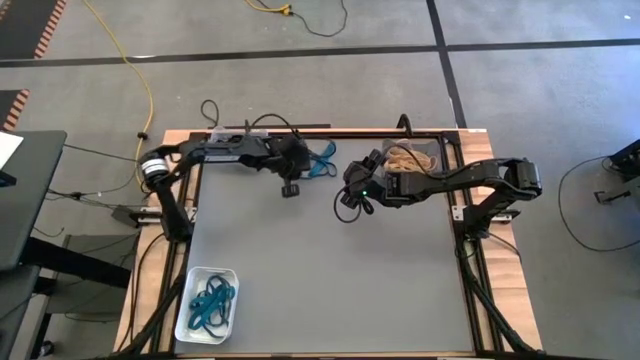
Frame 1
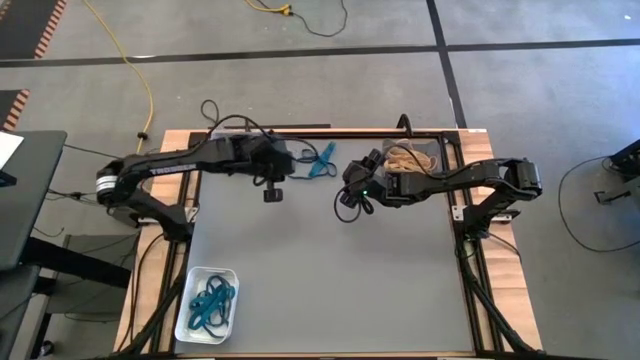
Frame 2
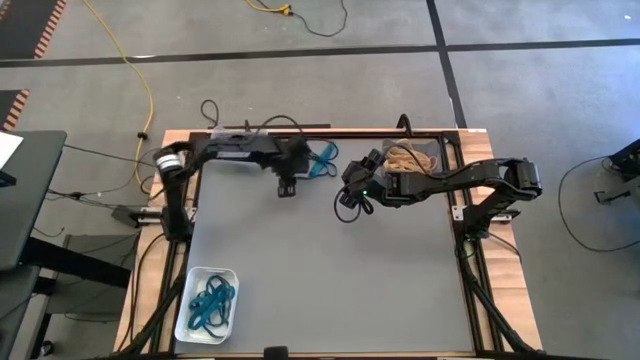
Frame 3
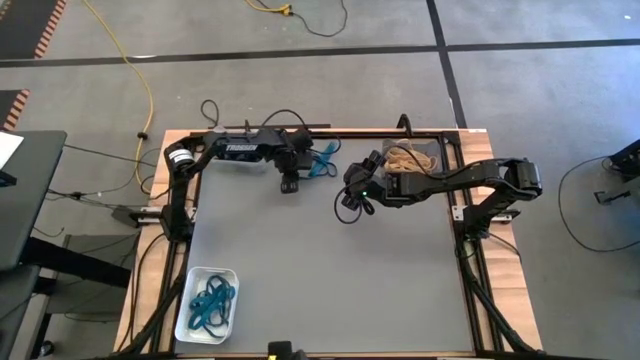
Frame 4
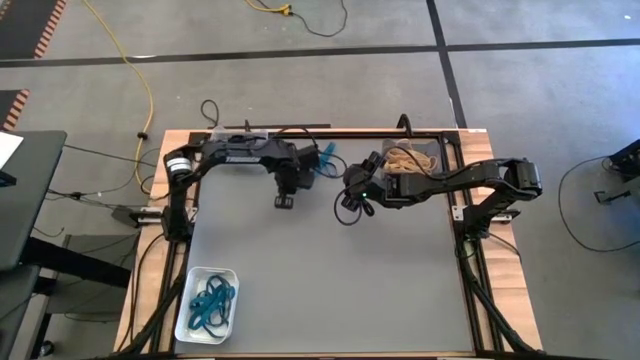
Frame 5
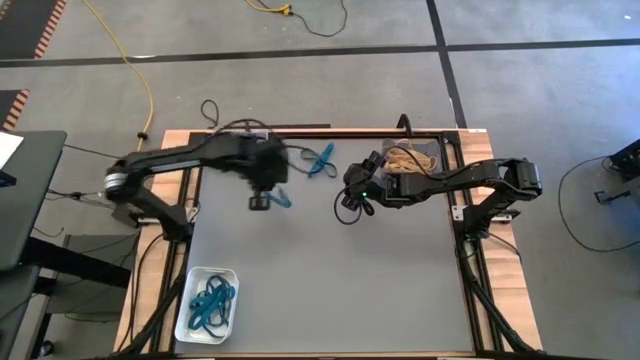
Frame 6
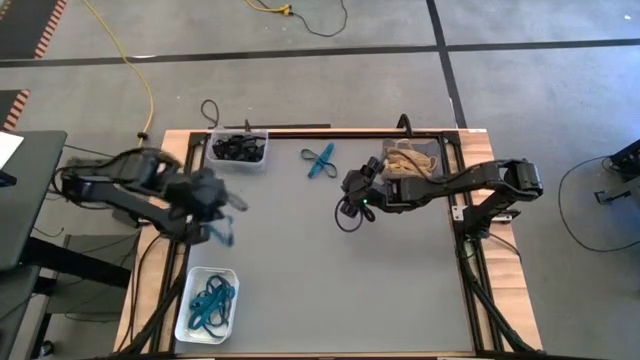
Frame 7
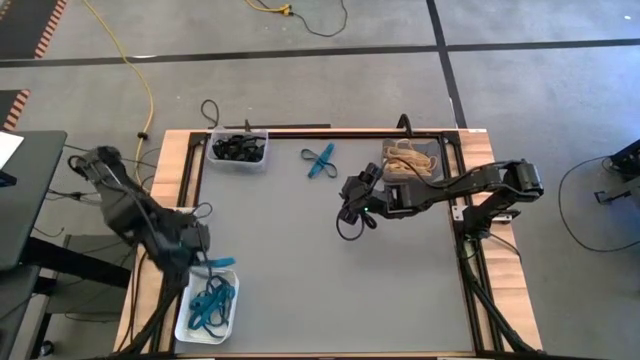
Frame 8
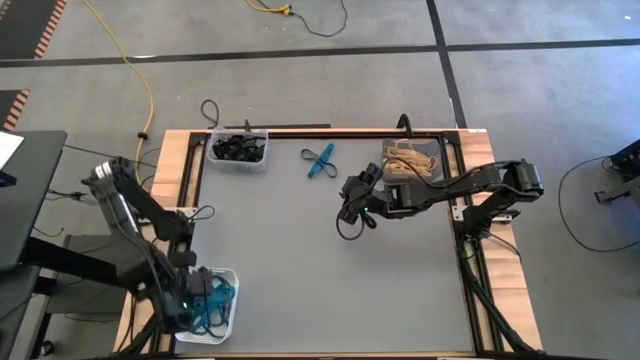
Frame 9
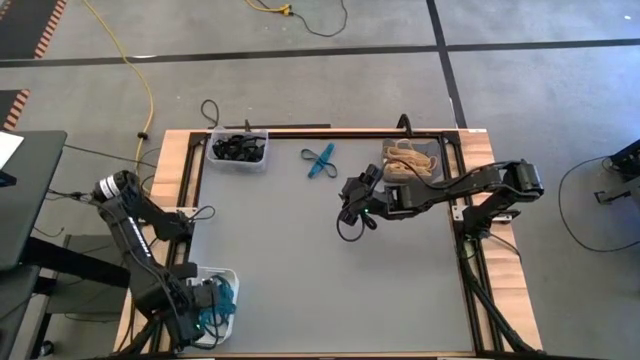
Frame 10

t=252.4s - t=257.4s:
Task: Sort rubber bands into baskets
Put the blue rubber band into the white bin

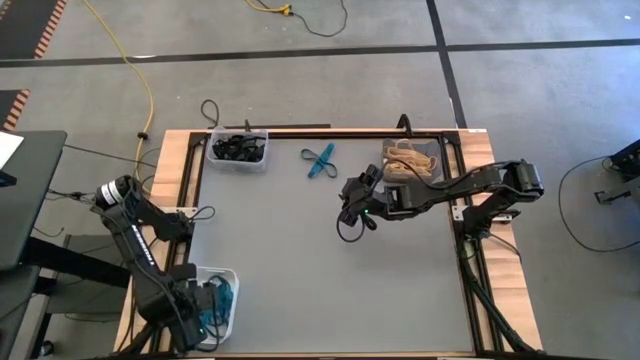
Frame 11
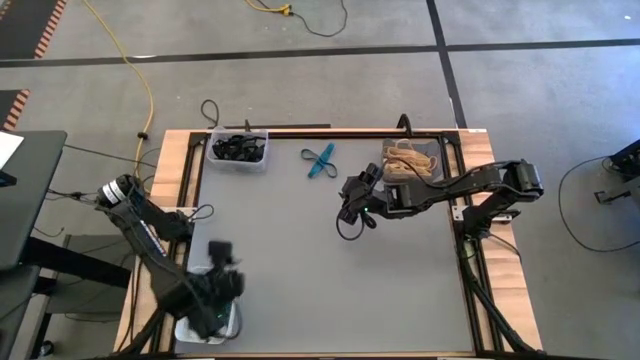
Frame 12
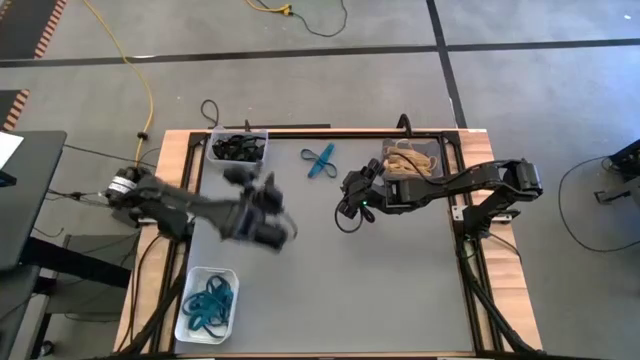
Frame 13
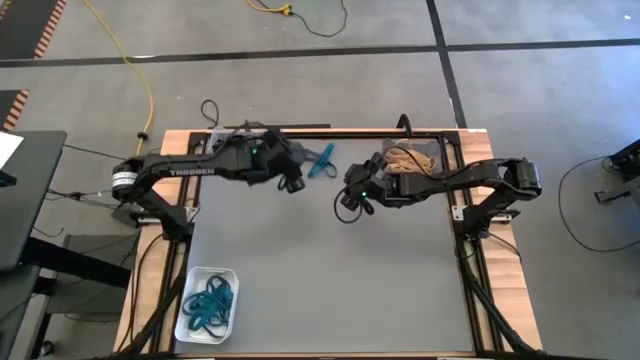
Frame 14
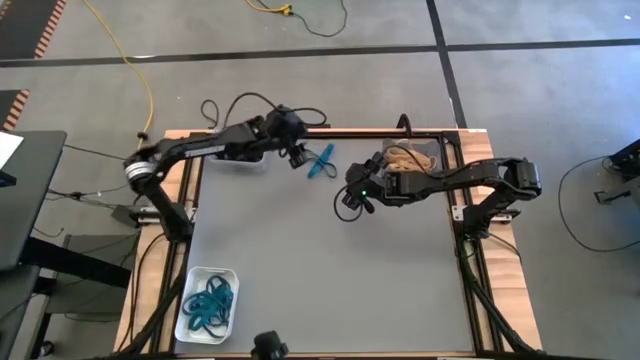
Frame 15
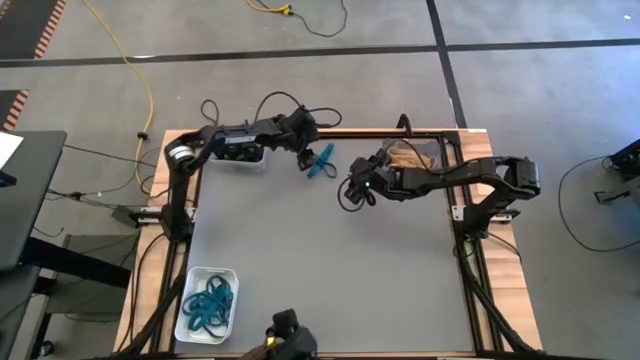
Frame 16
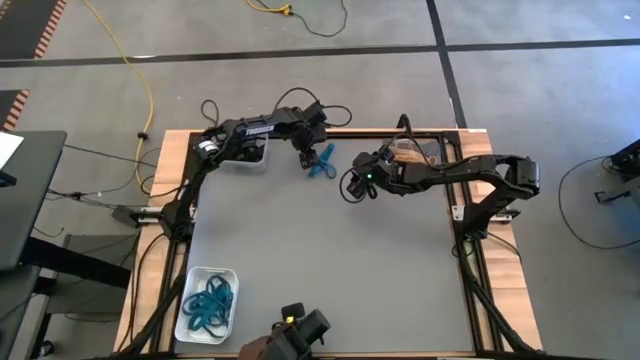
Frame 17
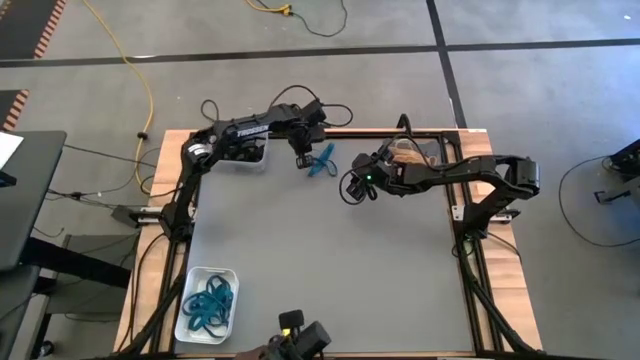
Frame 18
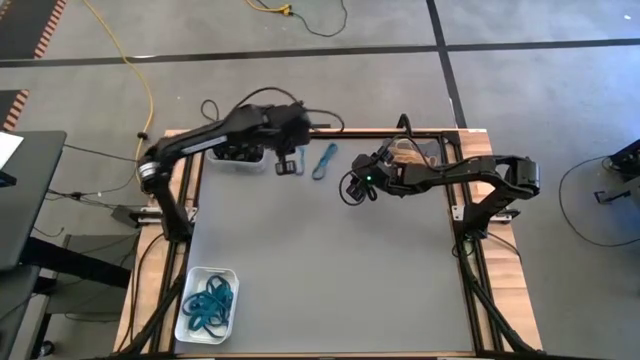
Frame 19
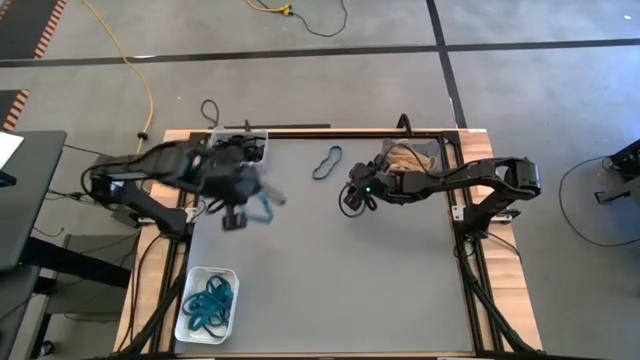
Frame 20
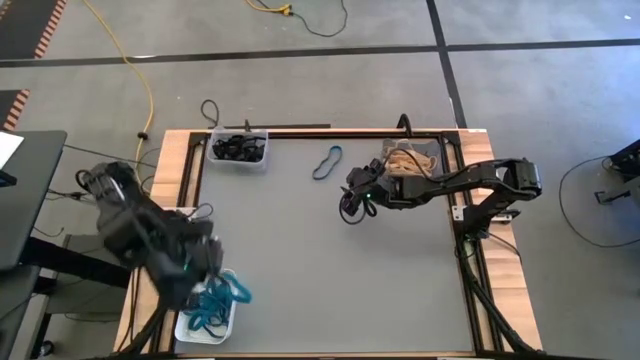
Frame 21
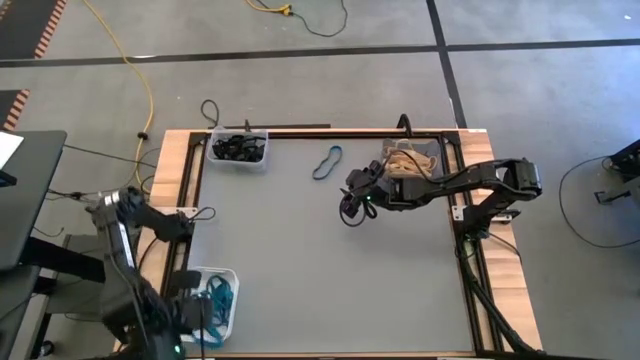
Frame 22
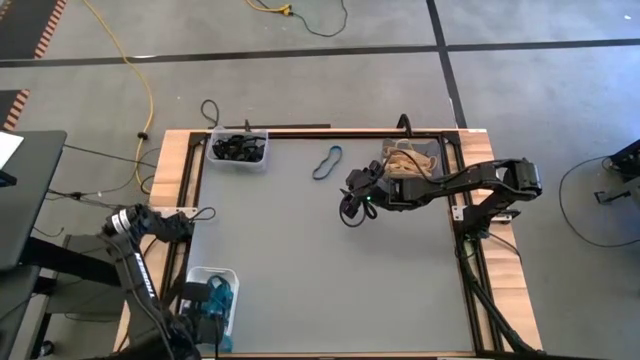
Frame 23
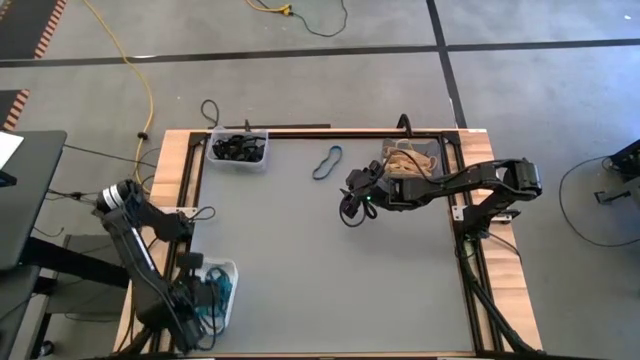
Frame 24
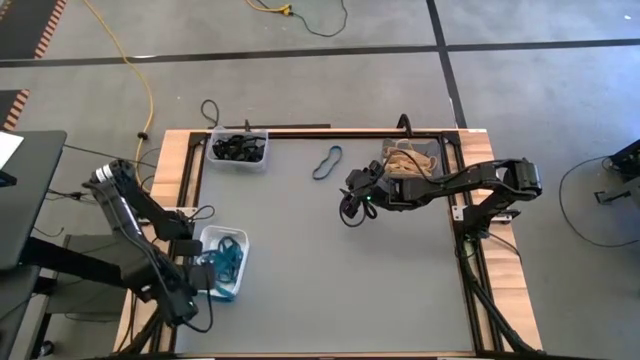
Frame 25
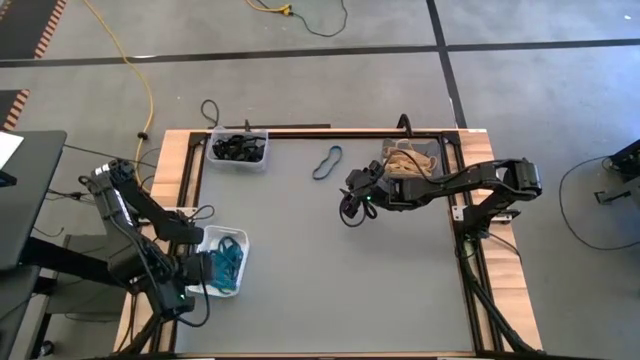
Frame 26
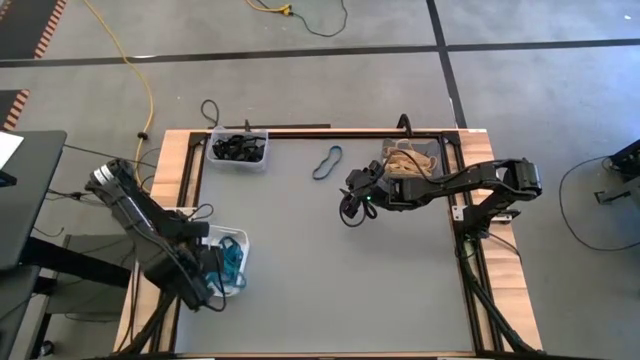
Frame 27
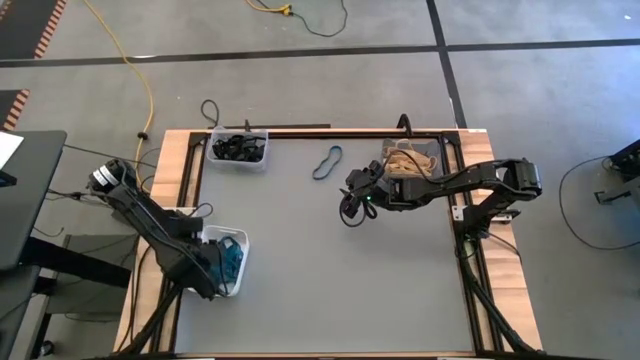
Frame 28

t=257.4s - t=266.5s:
Put the blue rubber band into the white bin

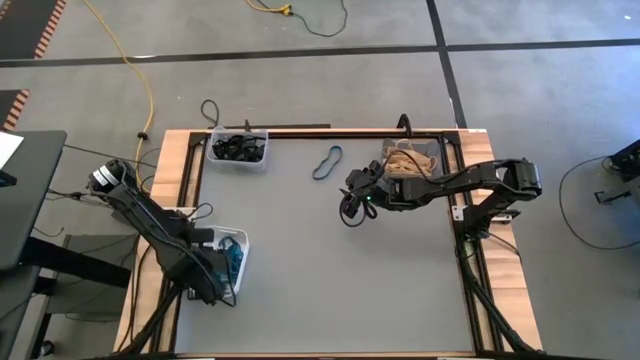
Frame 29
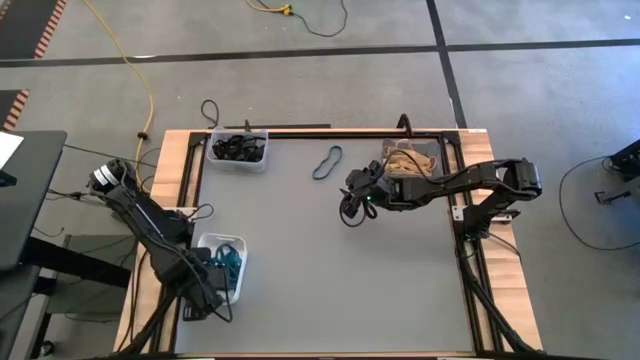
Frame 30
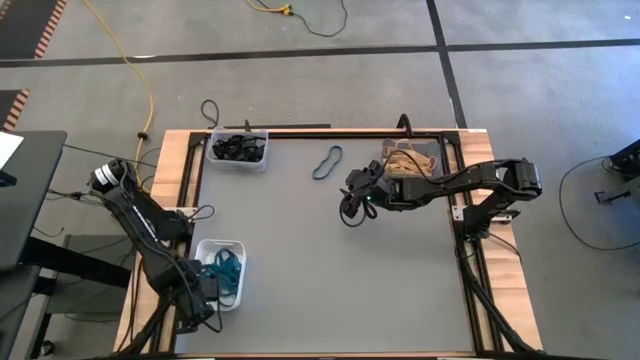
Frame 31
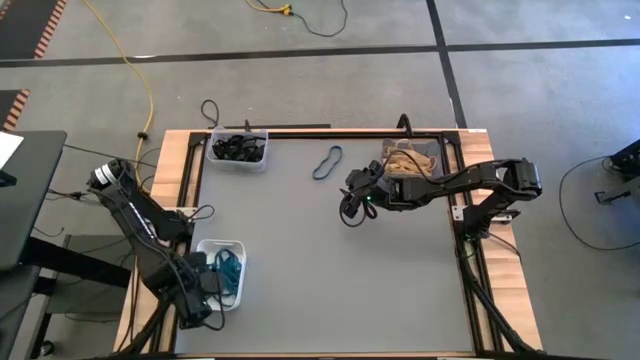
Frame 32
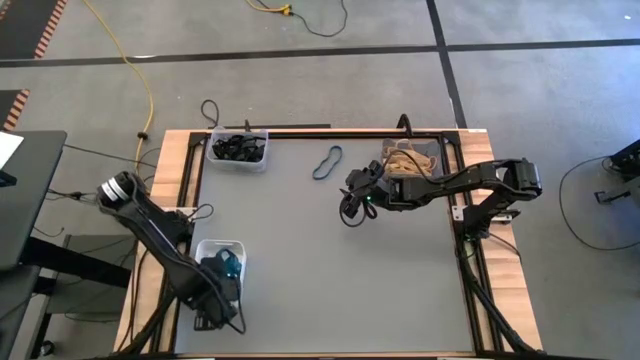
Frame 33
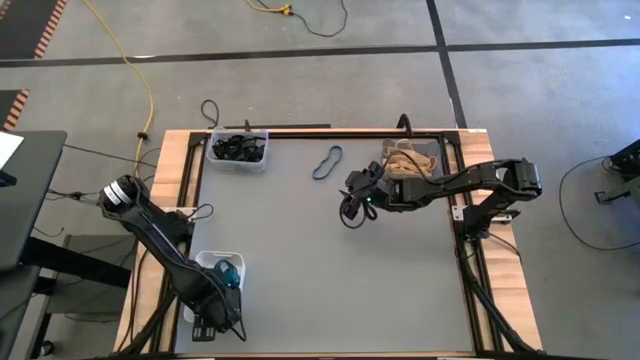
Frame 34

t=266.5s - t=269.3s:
Adjust the white bin

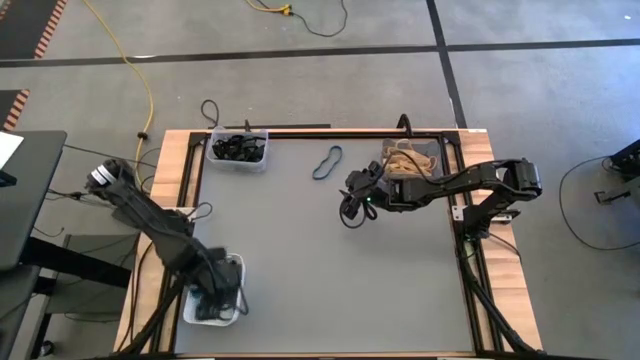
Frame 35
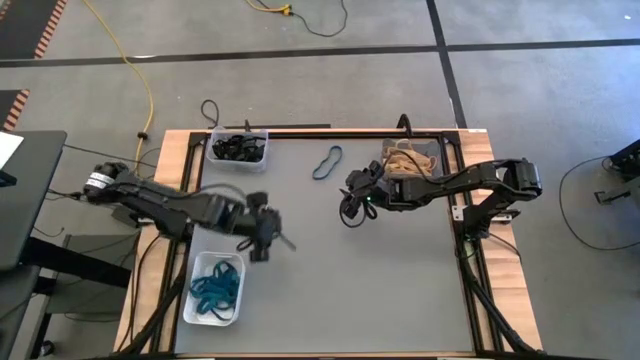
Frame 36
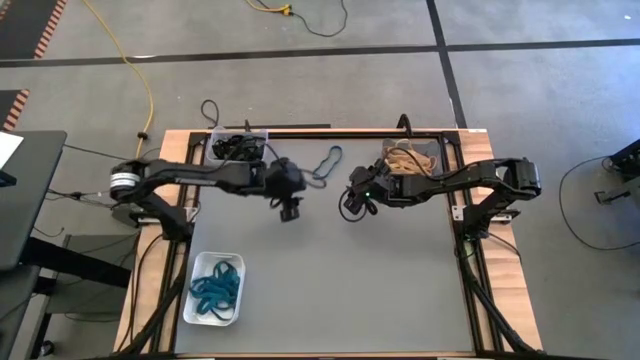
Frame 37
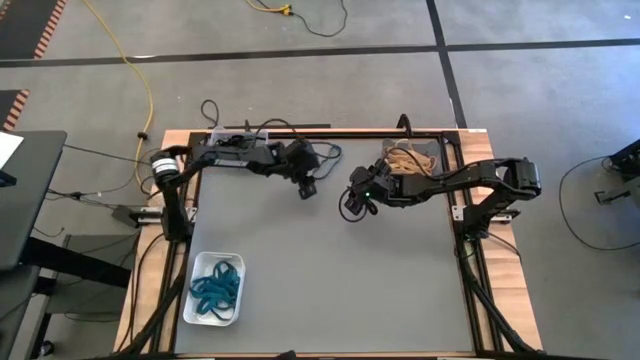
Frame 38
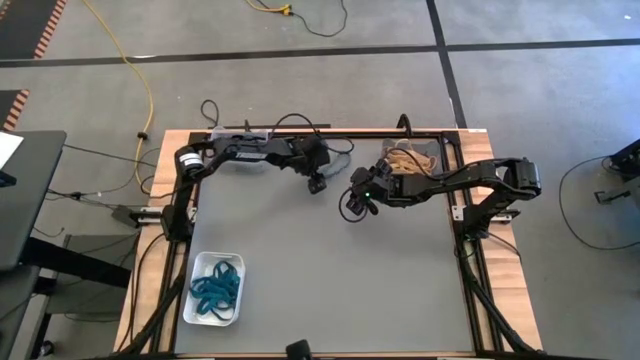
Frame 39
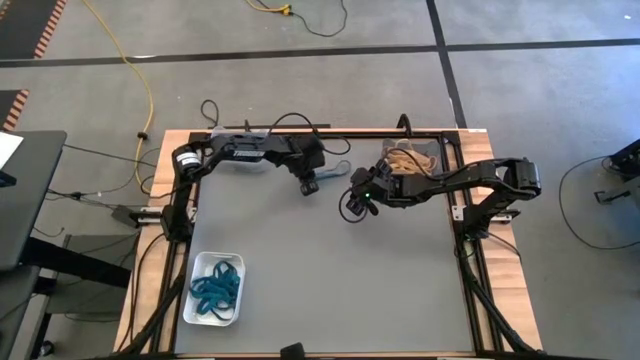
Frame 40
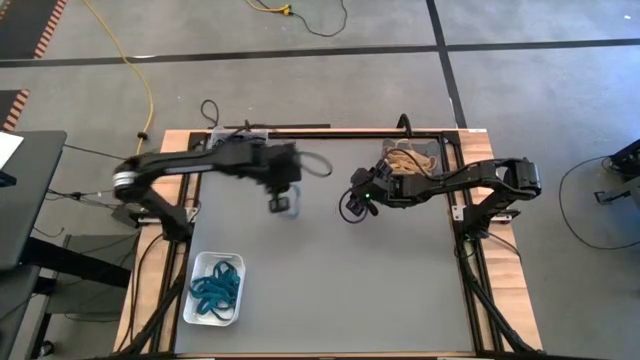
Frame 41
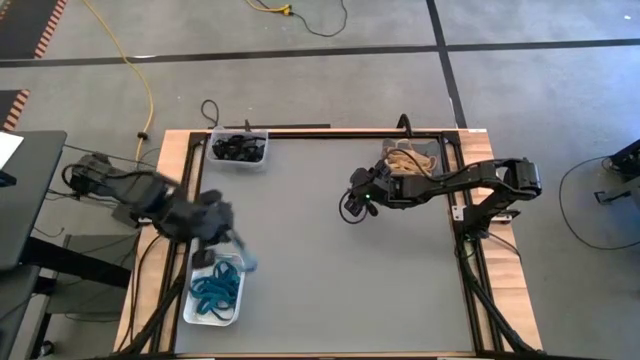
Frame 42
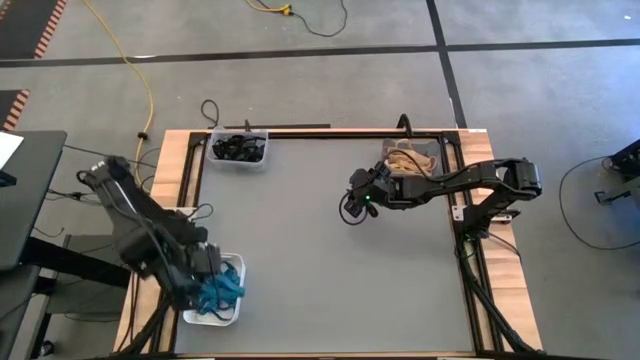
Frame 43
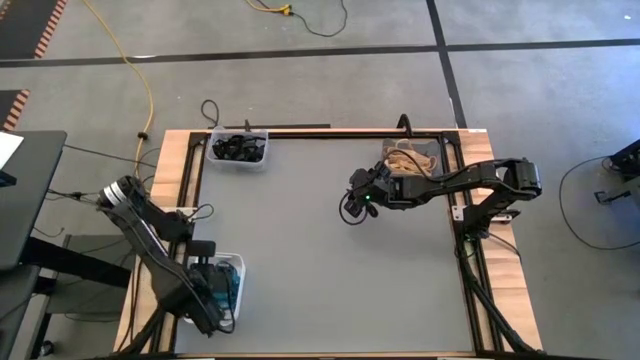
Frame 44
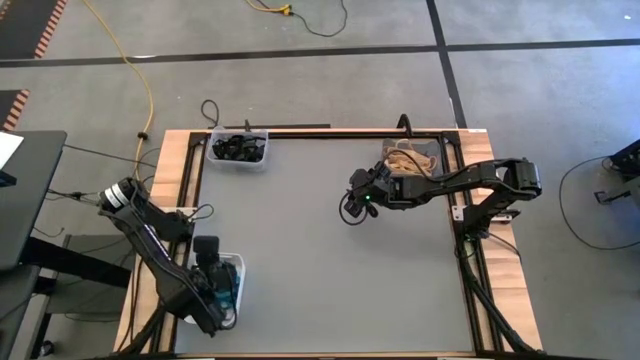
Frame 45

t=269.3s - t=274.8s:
Put the blue rubber band into the white bin
